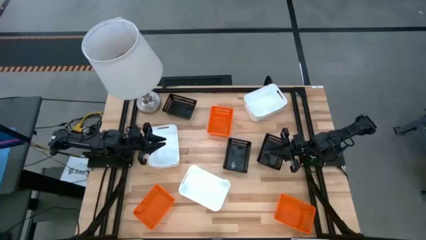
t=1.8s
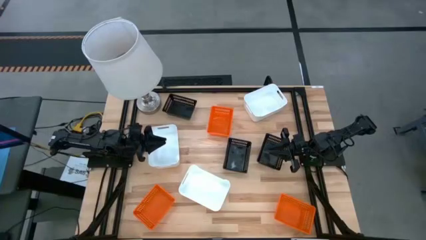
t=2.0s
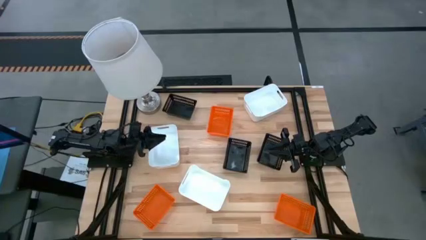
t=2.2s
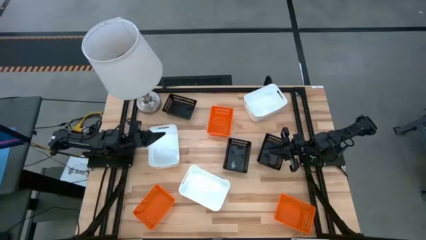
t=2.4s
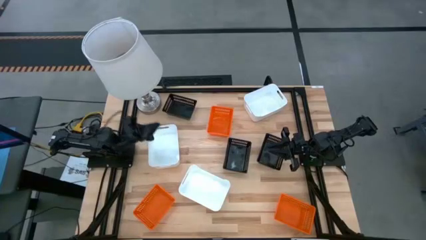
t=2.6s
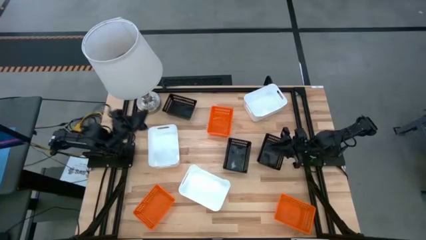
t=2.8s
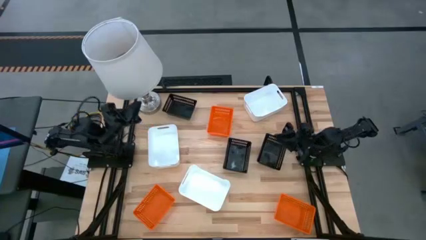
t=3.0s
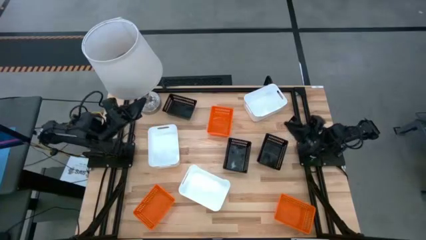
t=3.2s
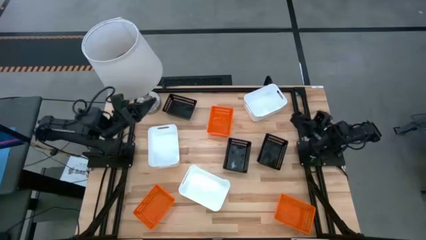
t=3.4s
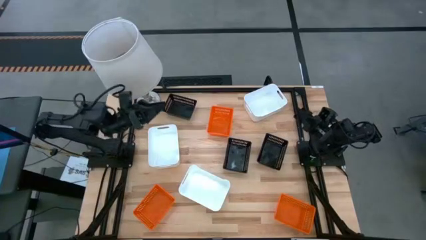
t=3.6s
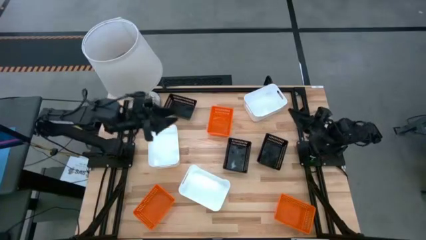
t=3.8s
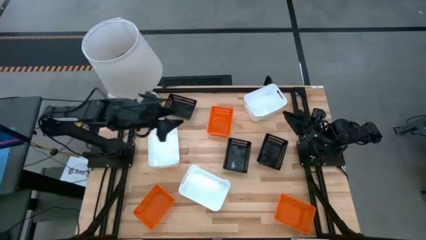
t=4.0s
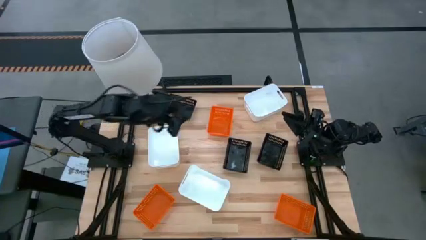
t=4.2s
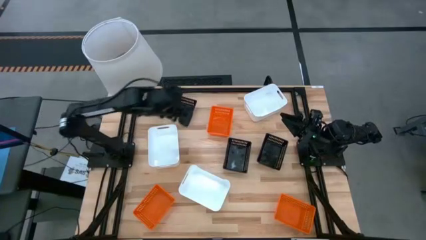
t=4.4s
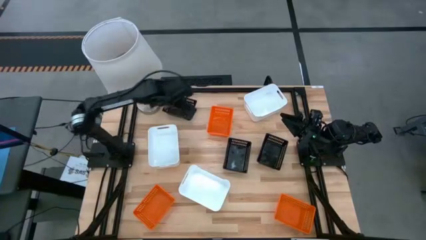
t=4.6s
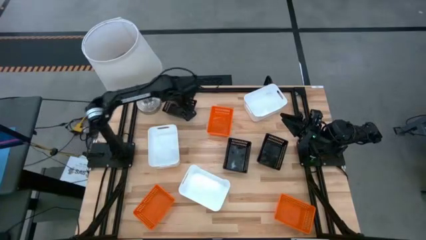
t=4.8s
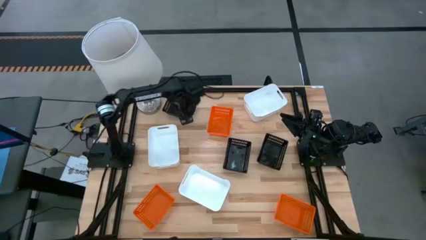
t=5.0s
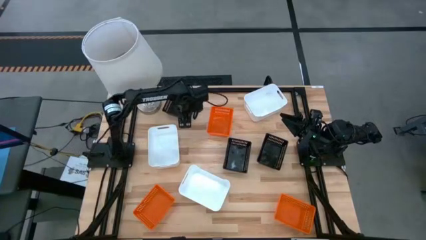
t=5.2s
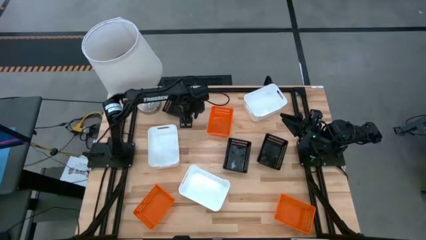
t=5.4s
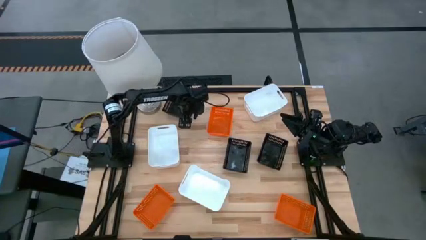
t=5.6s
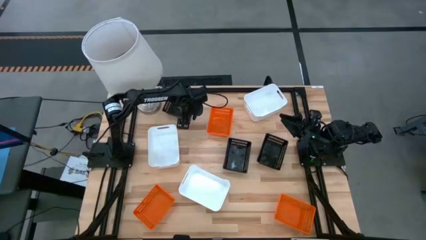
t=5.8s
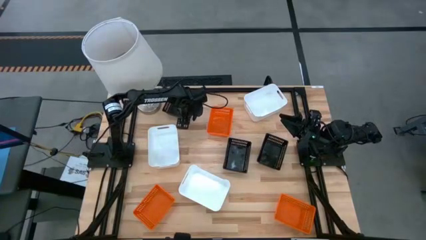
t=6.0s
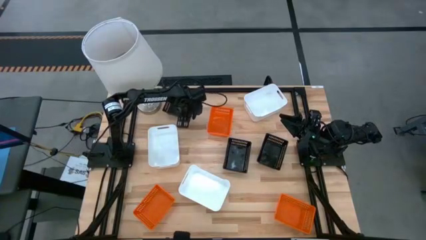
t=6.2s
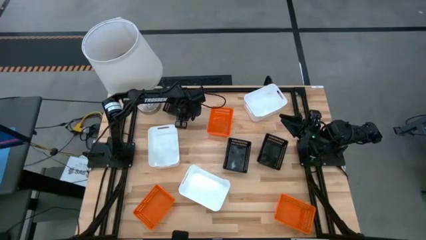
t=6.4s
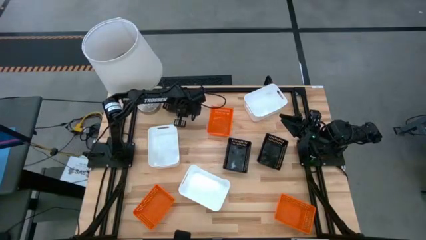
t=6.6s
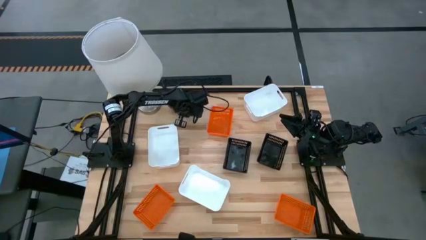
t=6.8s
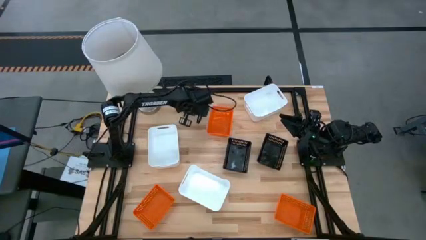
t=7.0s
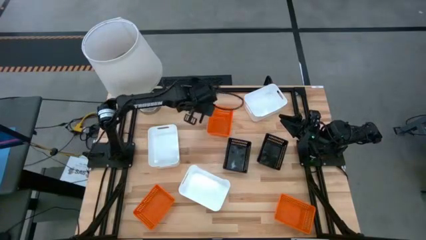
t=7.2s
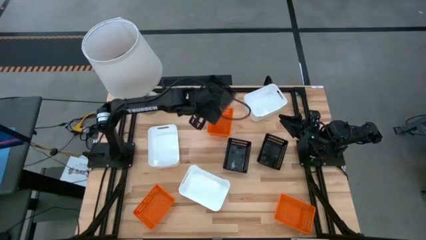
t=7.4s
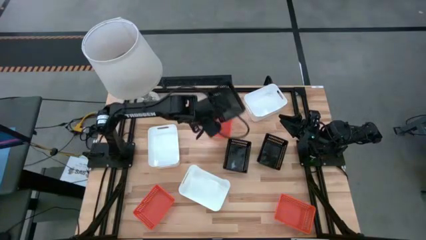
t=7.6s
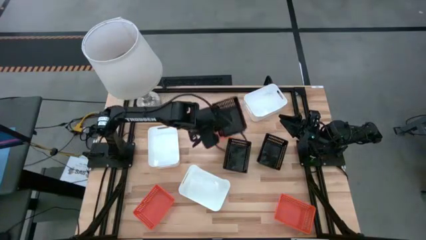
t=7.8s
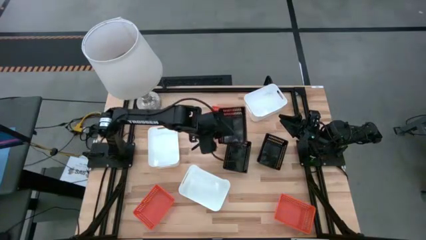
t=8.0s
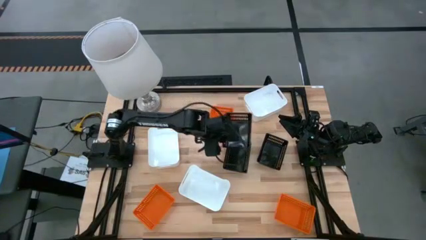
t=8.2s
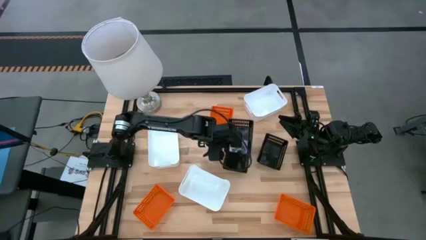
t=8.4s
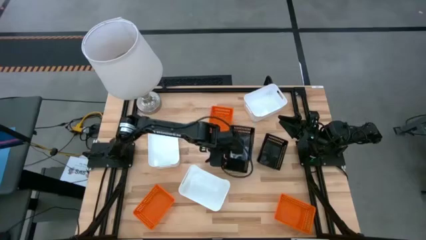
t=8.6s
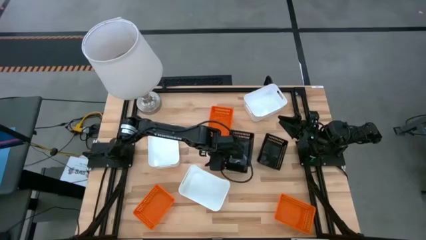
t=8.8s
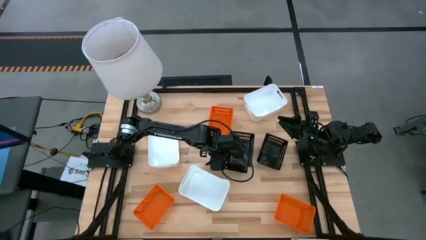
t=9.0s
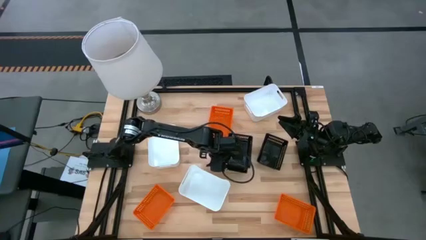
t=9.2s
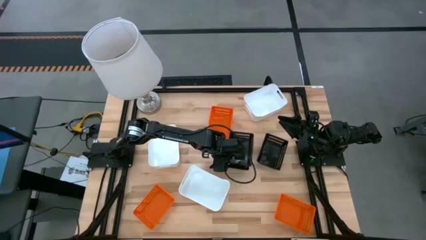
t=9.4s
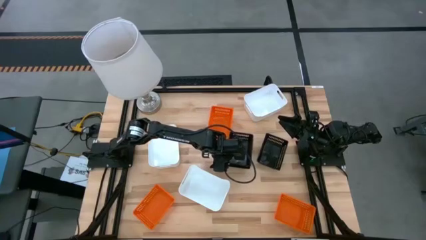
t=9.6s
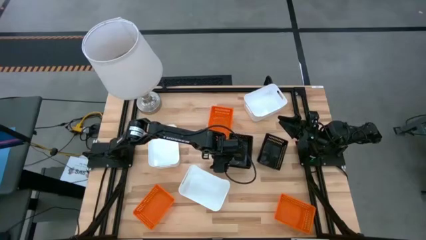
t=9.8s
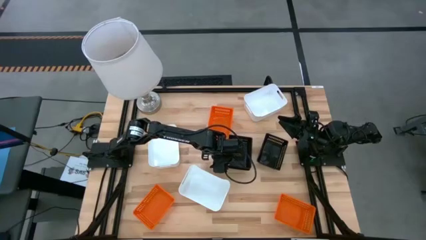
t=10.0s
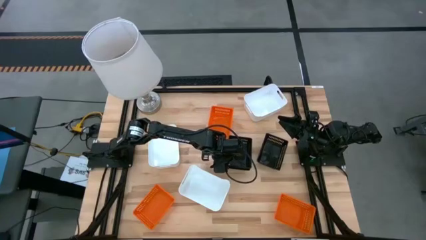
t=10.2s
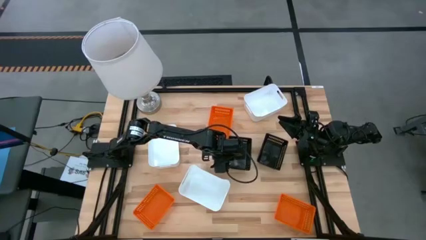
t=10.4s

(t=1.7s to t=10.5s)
Stack the top left black bin on top of the bottom left black bin

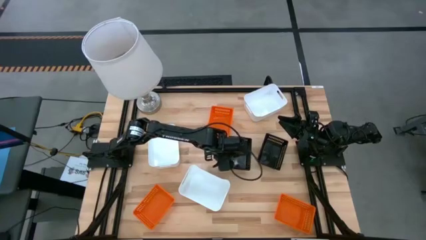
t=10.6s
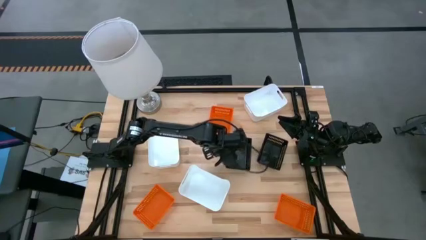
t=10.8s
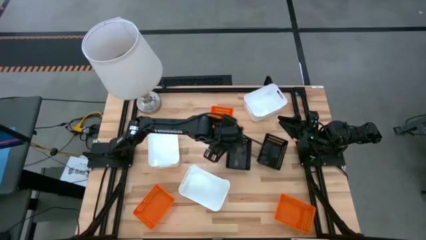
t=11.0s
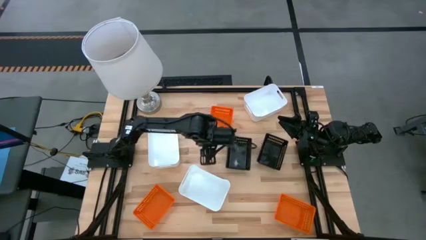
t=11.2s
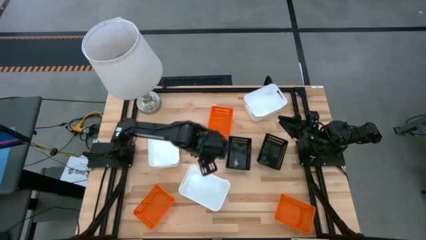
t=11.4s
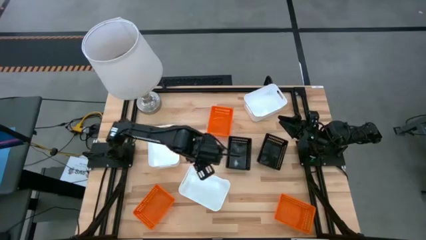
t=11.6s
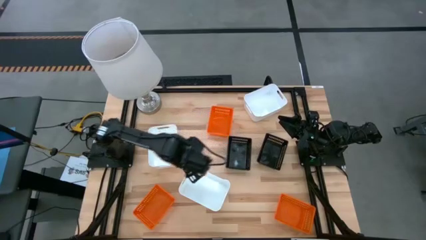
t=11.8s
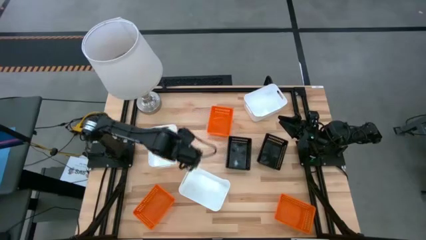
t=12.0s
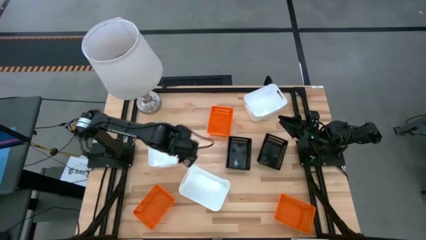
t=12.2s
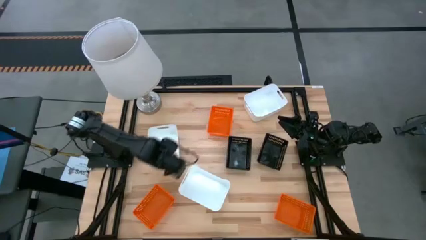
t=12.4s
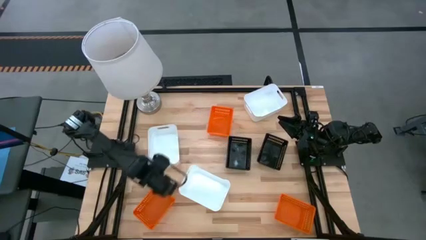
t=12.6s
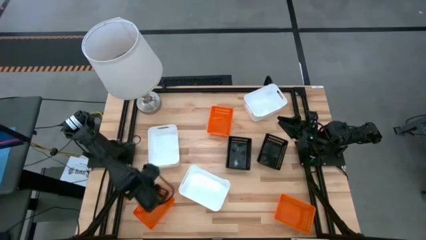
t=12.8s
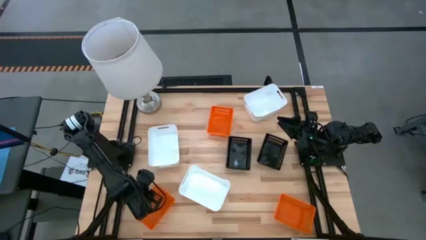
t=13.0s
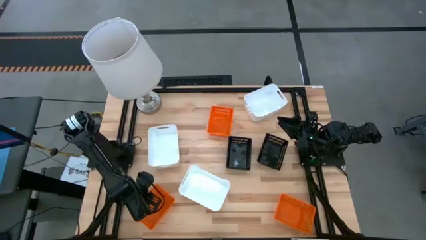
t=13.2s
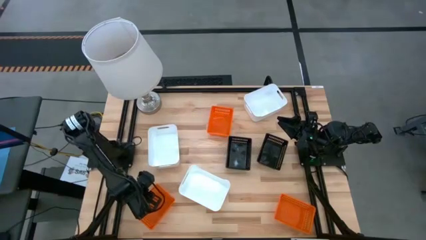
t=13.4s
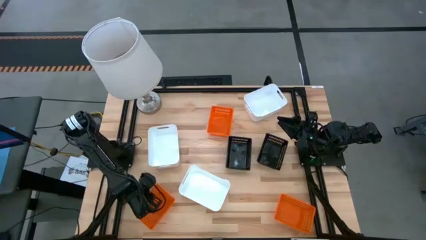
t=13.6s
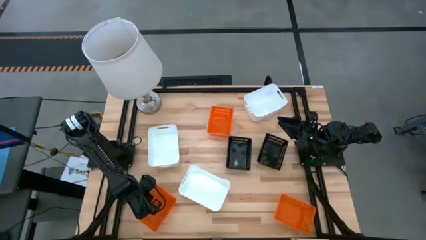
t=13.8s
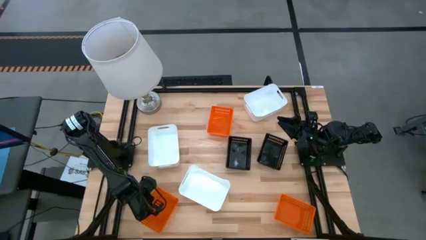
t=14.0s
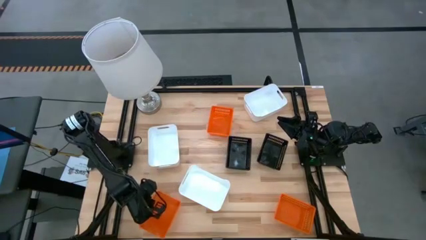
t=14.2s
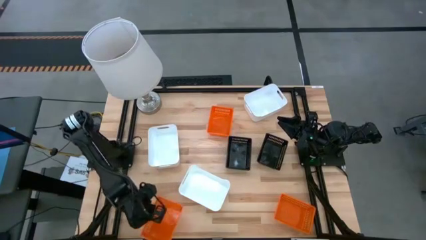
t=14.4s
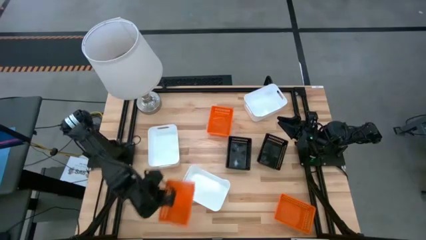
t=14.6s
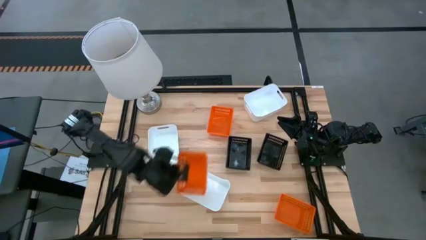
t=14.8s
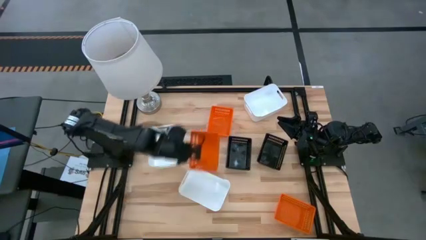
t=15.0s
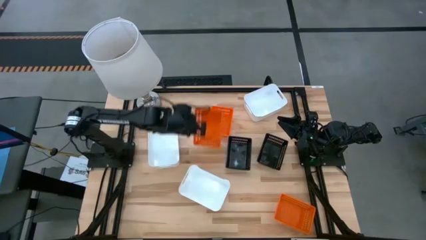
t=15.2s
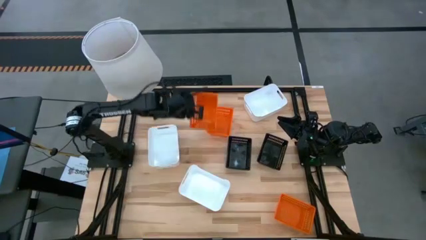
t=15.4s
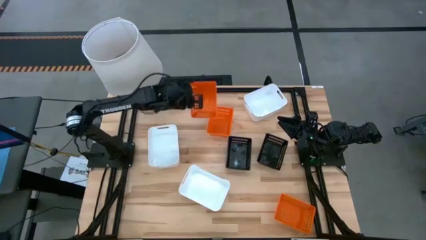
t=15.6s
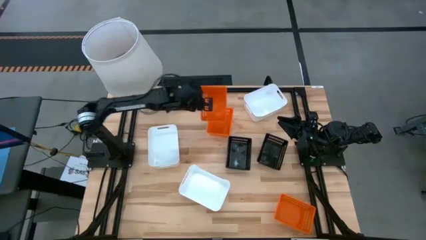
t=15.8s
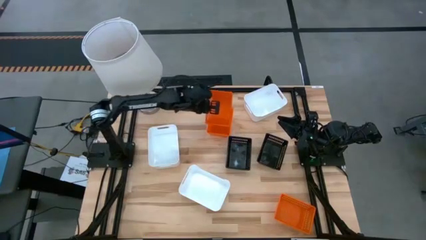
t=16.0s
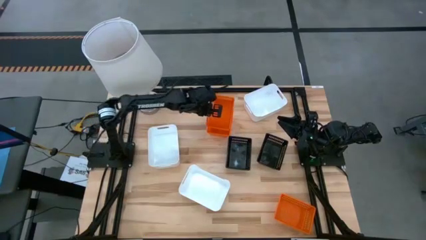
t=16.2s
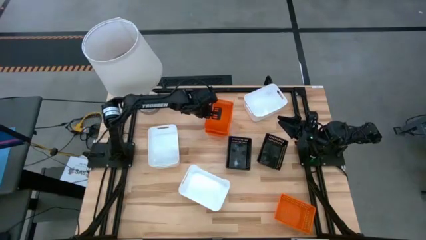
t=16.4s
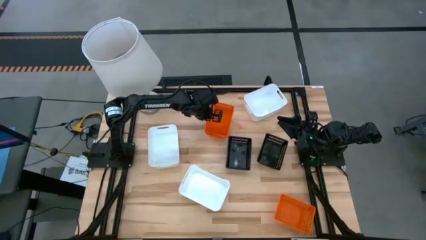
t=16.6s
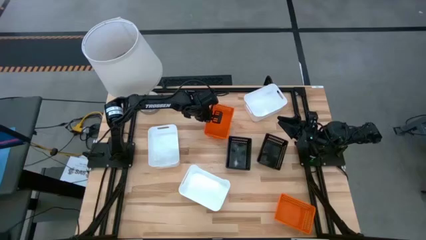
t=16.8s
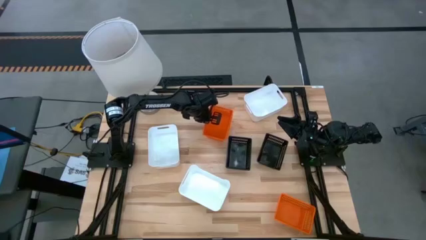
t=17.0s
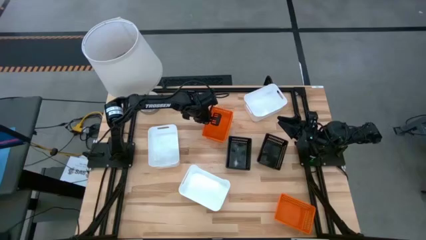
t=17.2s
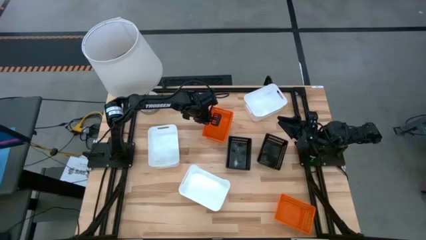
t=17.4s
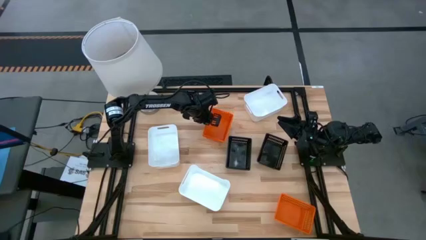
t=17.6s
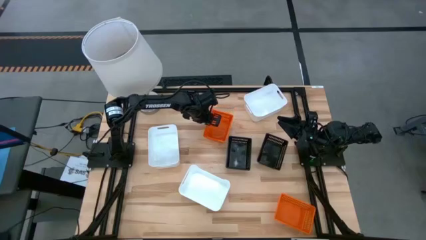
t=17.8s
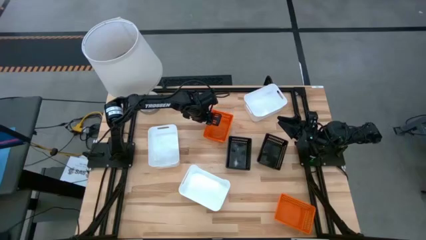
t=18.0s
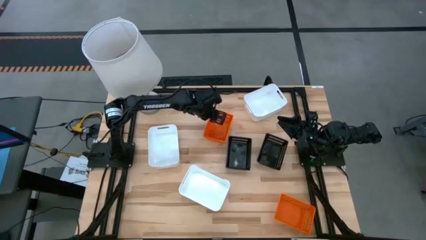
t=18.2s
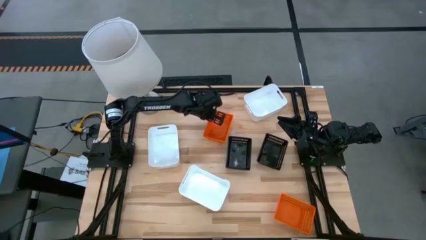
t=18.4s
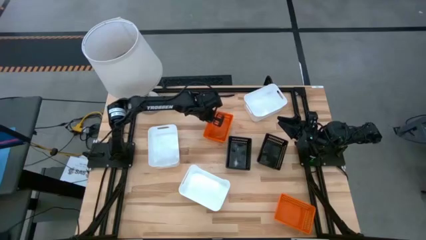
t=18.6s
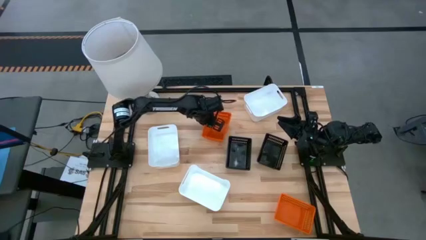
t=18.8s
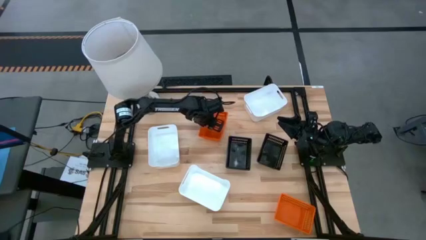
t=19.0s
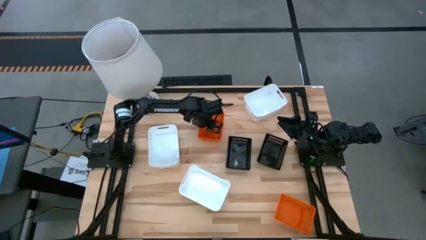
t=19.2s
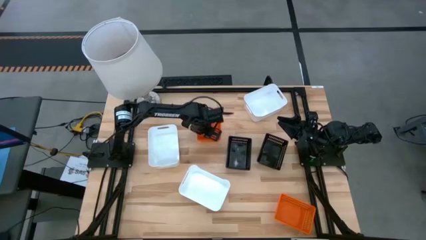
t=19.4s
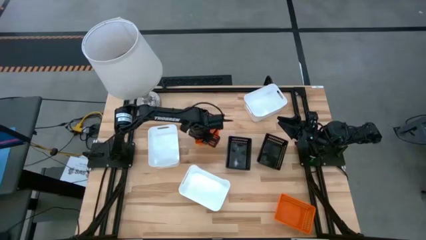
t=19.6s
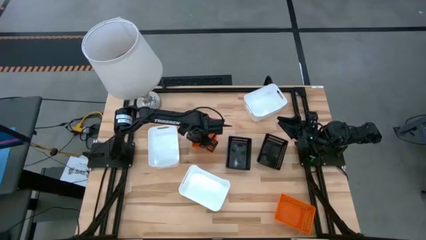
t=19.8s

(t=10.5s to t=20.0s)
Stack the bottom left orange bin on top of the top orange bin
